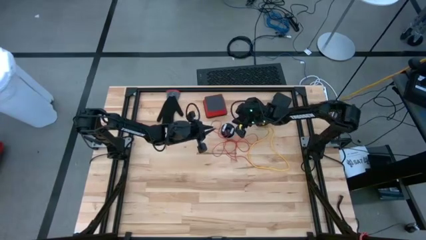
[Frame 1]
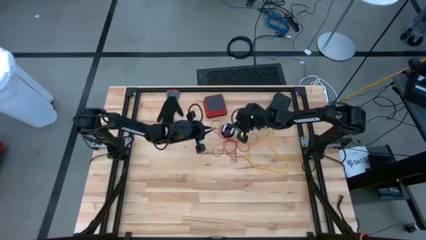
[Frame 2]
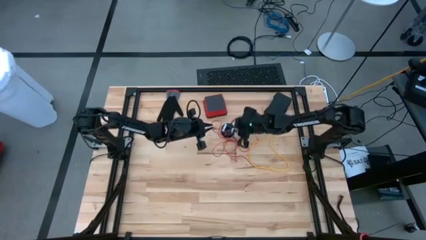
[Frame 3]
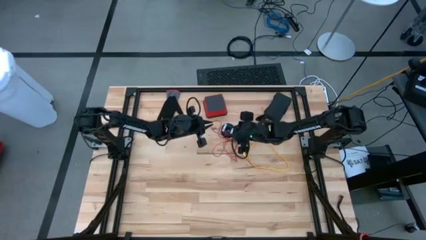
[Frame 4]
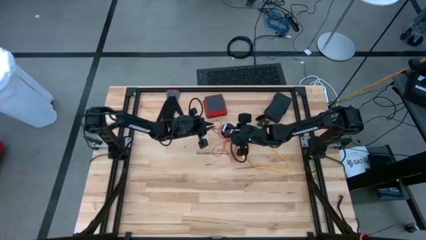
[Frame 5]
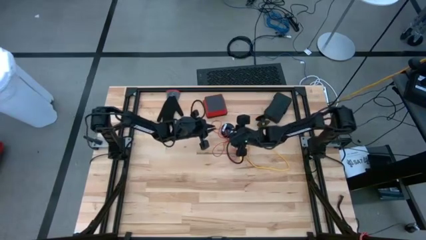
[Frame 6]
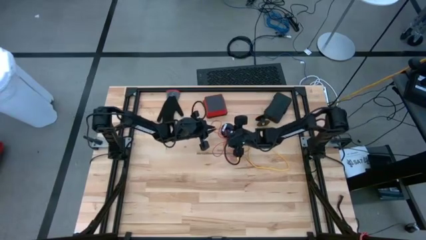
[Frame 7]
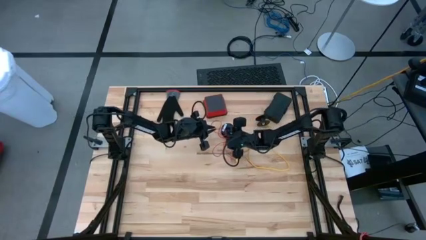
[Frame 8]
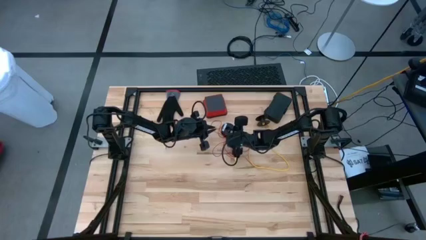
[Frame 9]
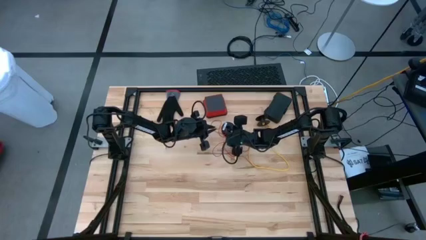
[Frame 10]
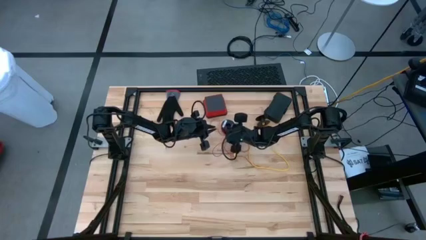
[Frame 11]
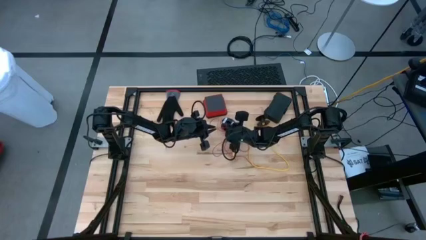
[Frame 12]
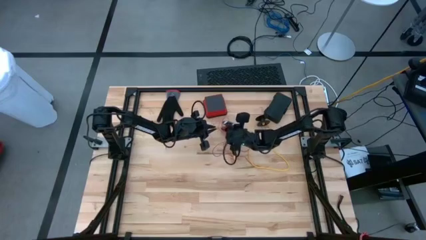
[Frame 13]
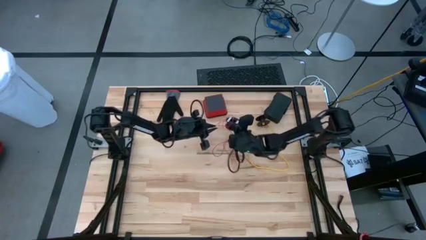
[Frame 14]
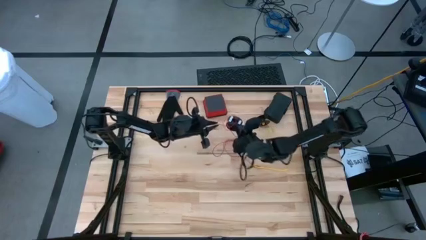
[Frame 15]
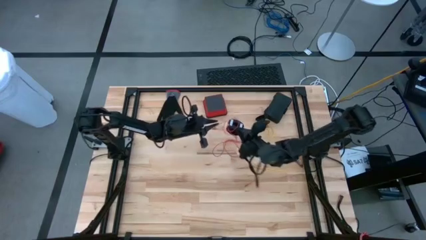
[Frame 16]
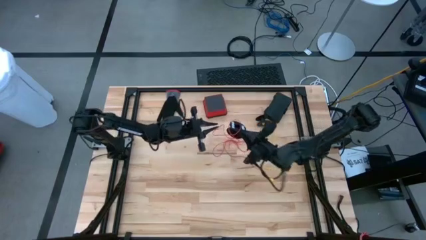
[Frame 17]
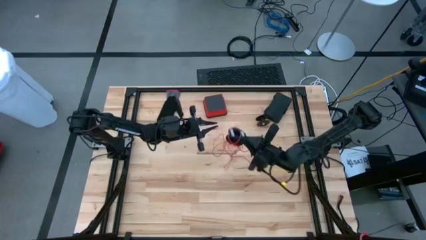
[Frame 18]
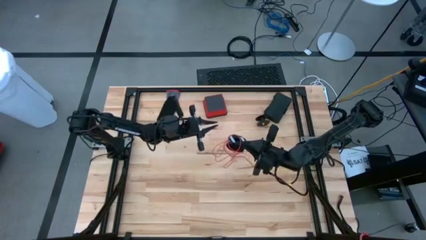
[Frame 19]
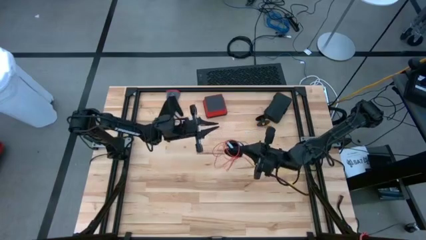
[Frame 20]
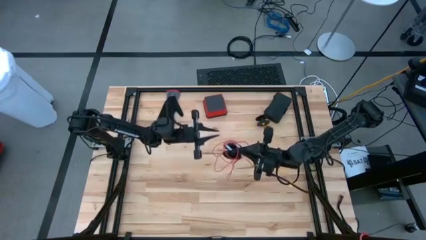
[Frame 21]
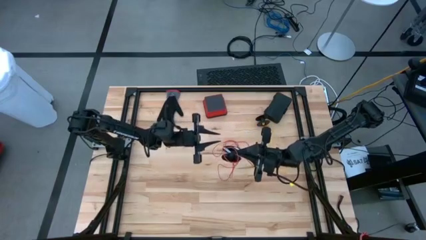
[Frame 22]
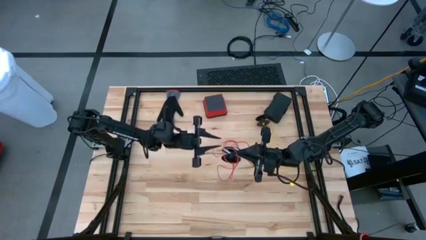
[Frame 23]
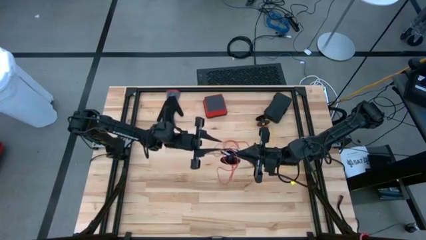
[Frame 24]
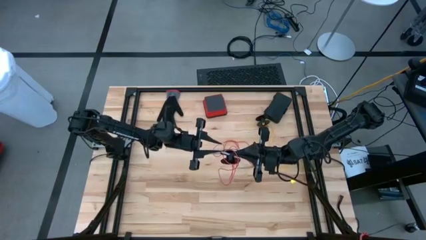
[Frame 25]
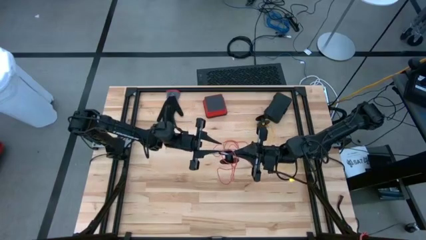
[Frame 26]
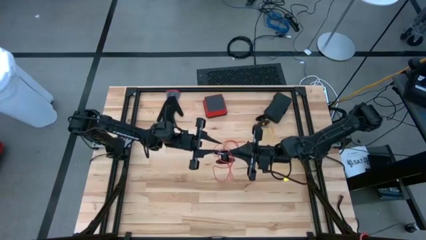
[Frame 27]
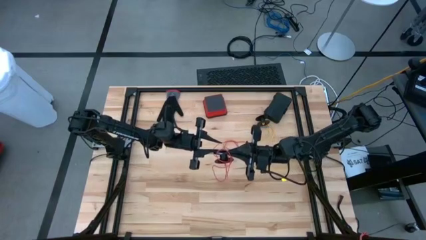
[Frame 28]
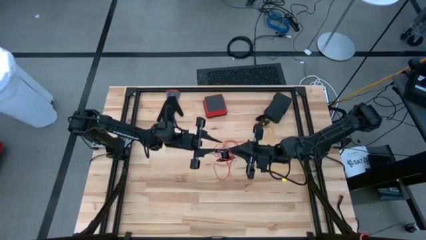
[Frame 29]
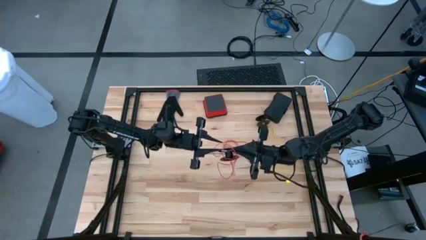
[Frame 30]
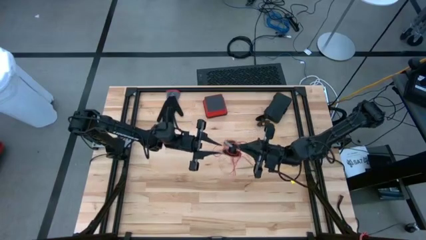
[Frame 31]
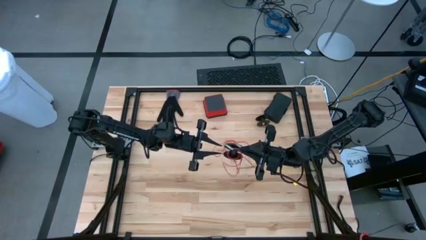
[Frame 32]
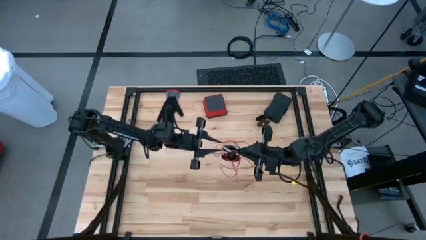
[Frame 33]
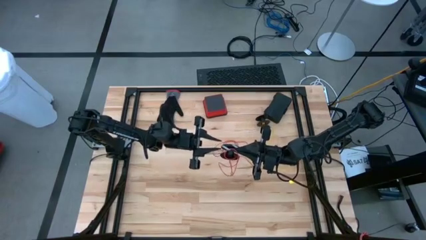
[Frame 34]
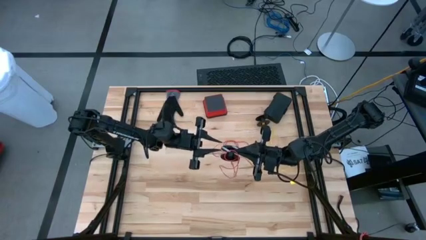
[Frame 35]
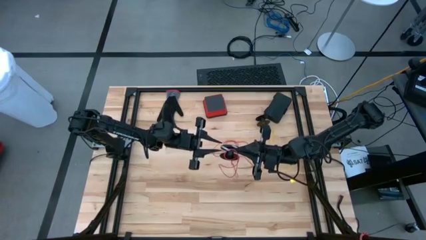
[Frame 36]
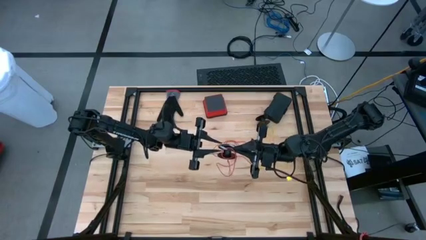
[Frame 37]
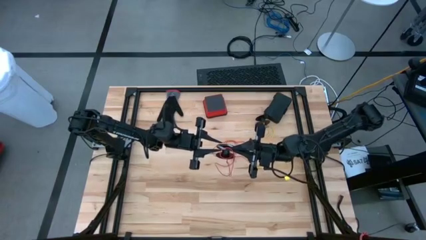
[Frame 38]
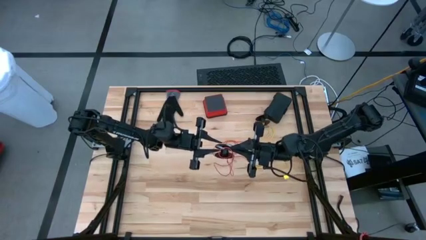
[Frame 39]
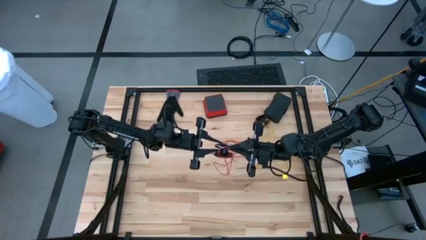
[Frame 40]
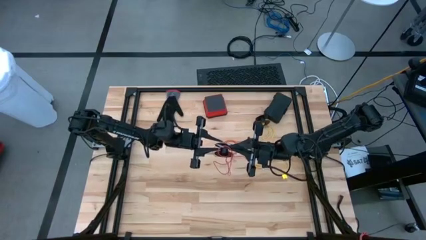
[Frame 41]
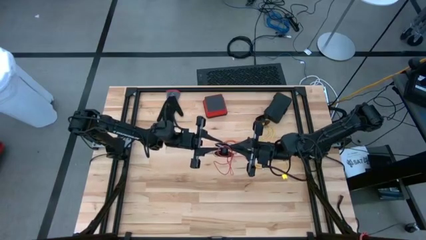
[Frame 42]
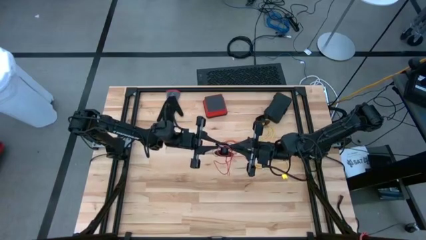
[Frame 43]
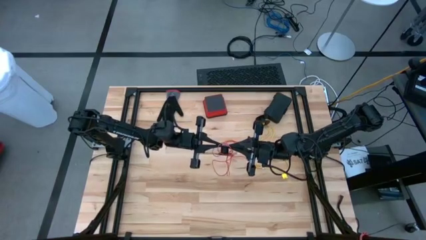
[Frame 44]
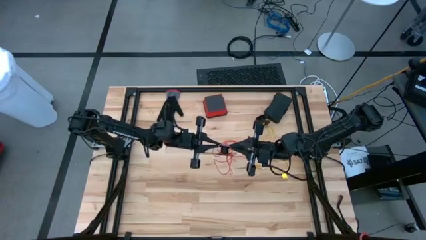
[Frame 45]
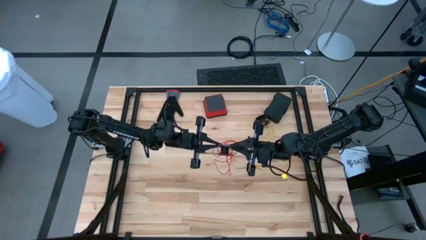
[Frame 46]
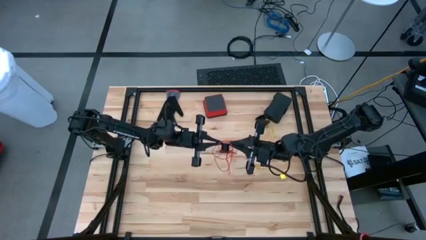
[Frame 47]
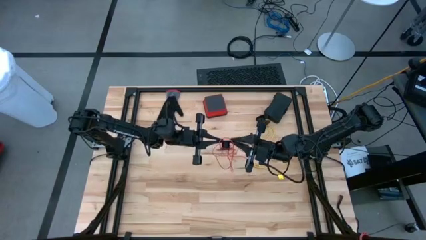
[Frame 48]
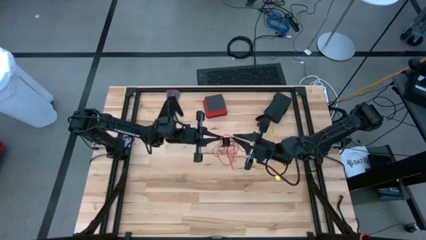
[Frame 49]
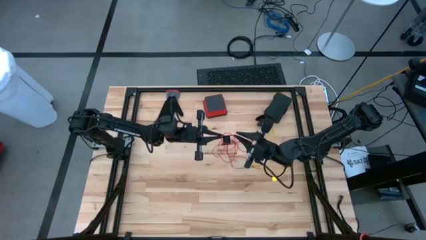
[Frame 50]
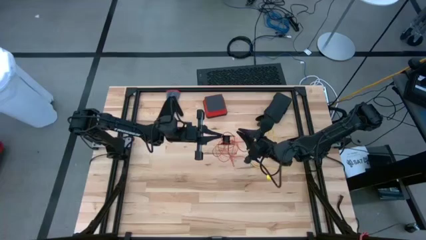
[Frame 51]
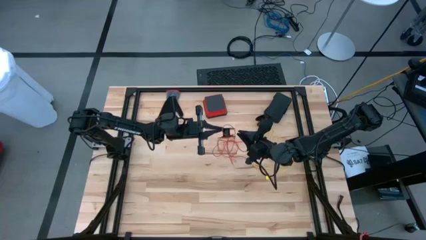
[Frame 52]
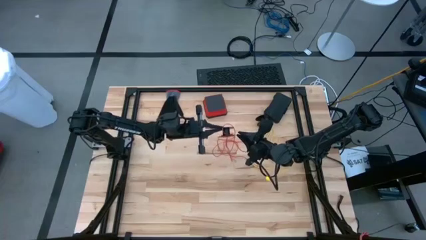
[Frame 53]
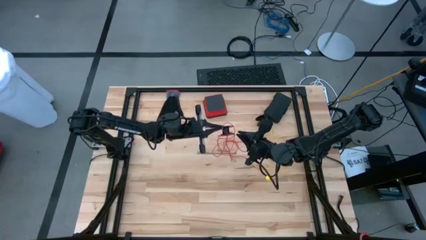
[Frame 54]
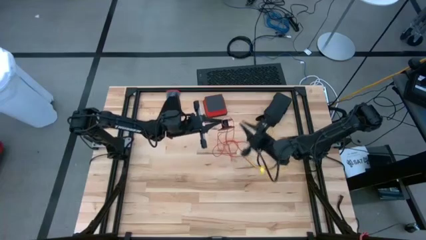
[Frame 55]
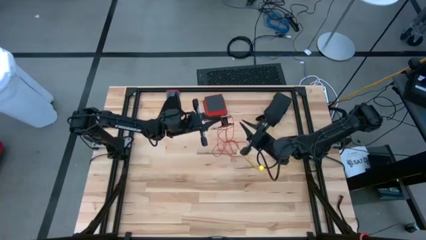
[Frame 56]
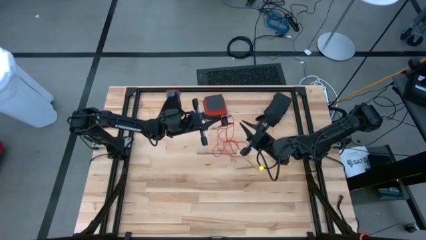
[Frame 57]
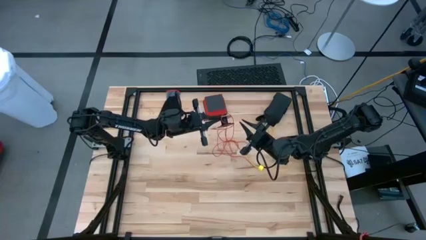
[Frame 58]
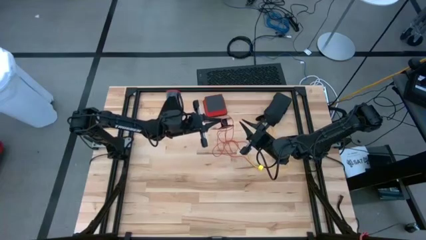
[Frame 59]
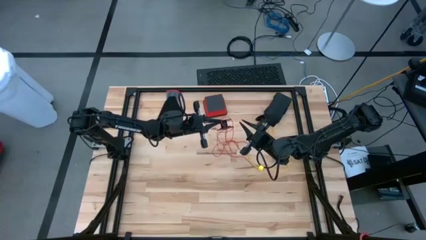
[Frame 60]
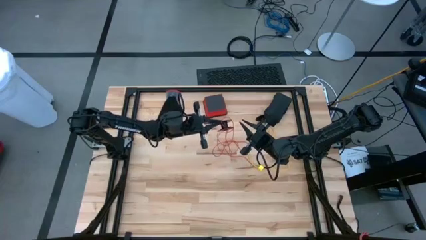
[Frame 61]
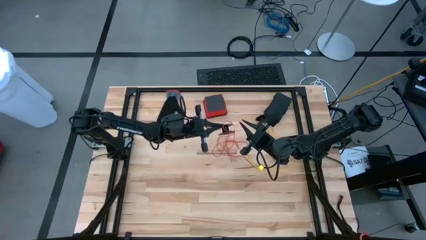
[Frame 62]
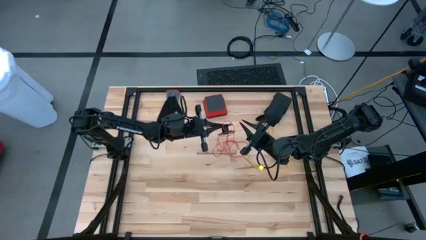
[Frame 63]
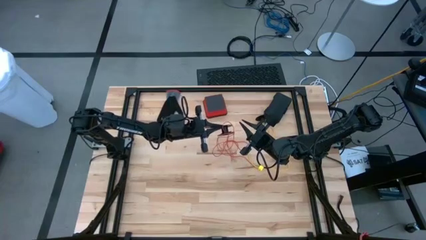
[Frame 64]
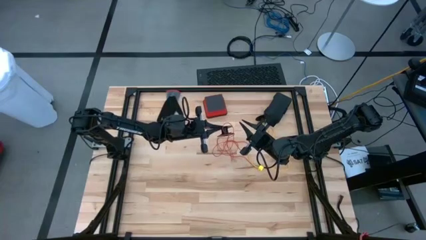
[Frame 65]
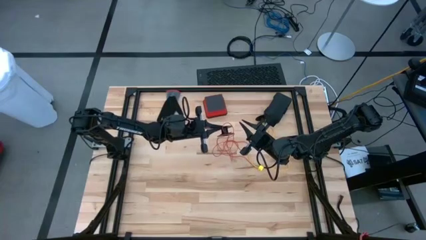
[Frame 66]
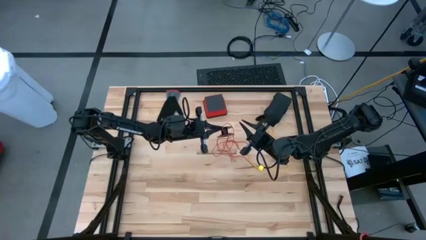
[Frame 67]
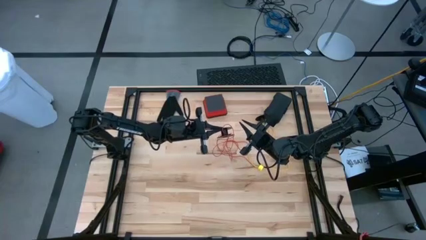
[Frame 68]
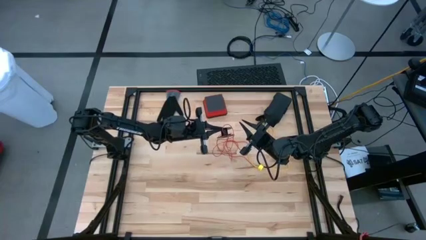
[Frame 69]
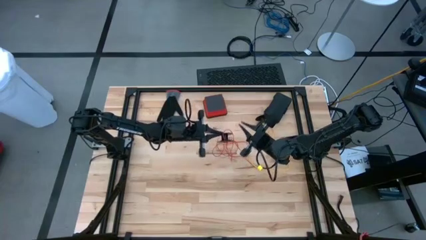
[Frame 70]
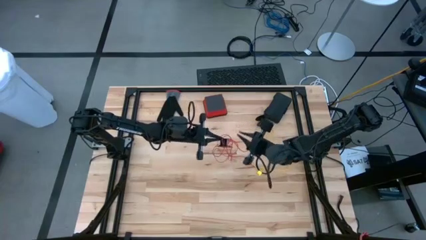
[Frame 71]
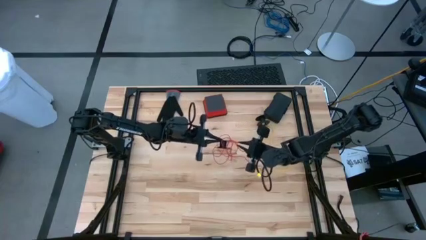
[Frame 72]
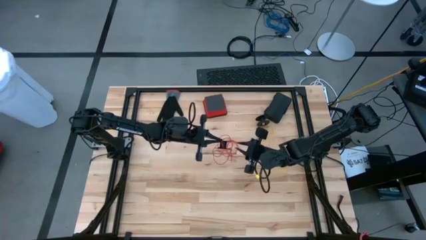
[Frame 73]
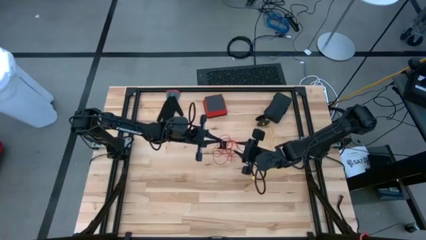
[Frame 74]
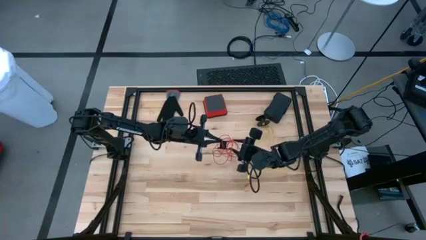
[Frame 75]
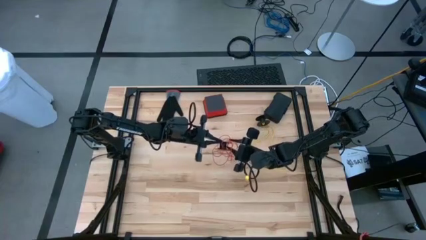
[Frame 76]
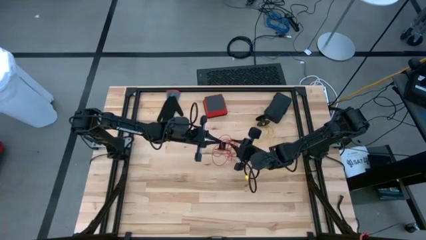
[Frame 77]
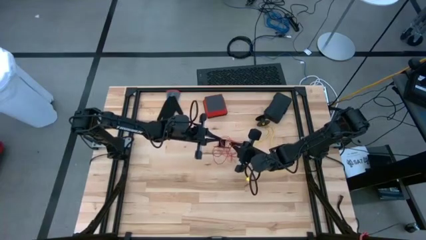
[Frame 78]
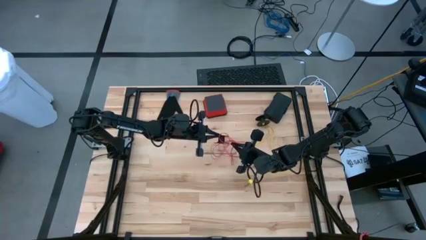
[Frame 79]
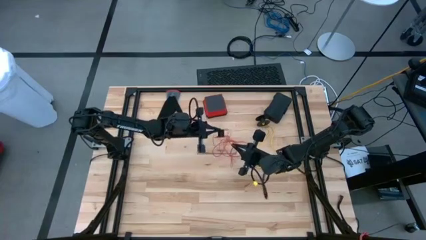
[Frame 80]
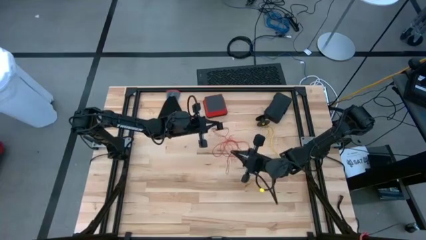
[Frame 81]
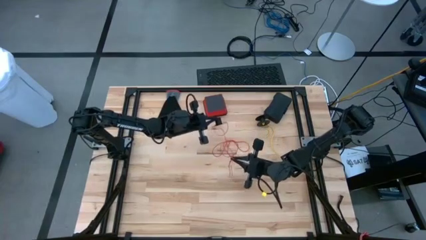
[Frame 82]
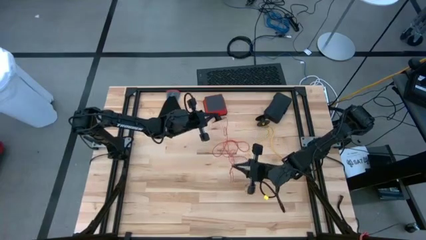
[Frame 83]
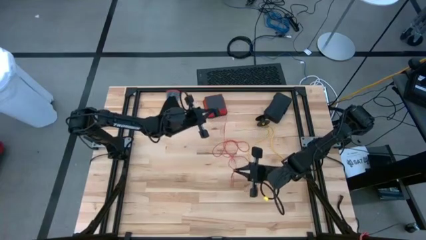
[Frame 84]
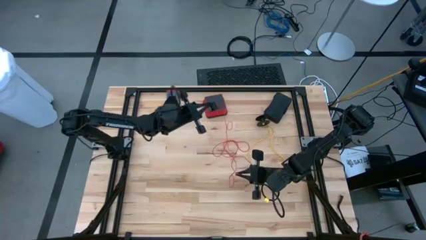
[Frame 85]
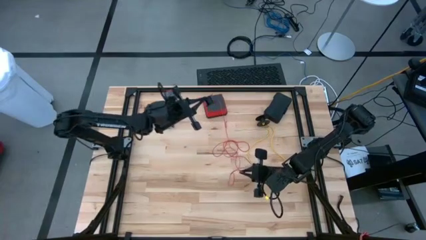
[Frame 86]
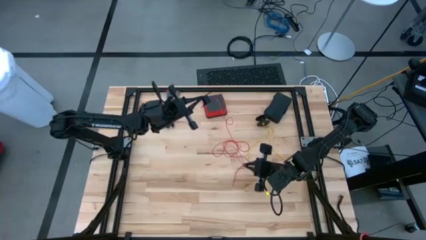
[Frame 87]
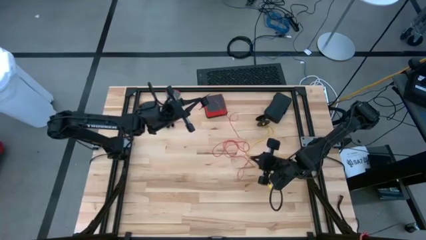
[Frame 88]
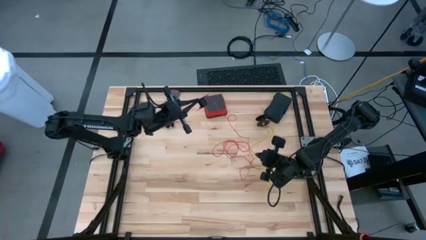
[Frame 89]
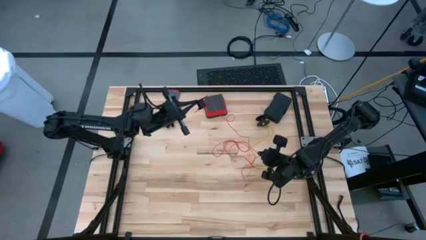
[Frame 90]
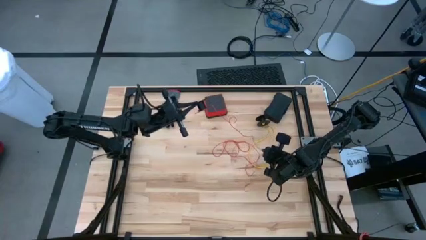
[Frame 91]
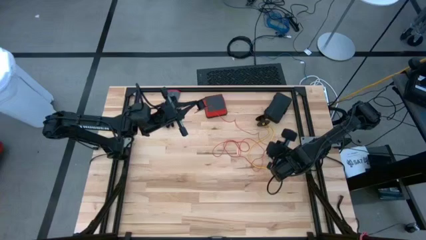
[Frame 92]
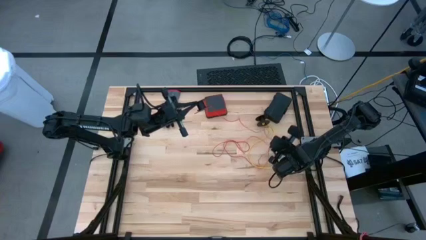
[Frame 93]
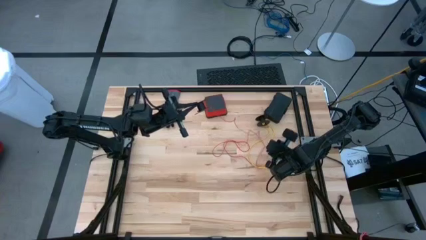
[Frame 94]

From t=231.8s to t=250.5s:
Task: Coil cords
Uncoil the red wire from the spool
